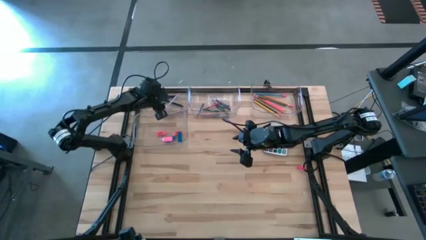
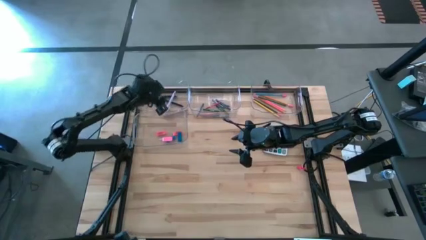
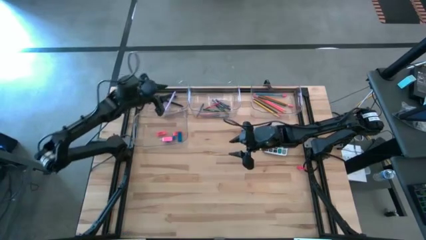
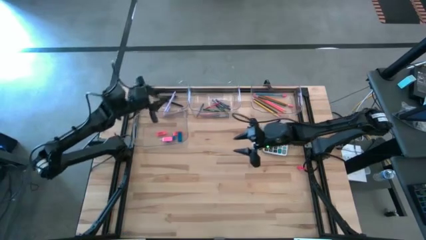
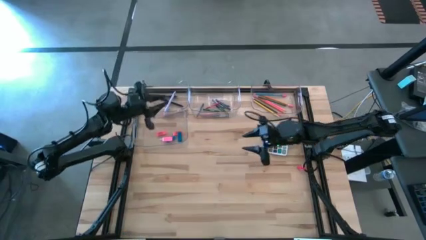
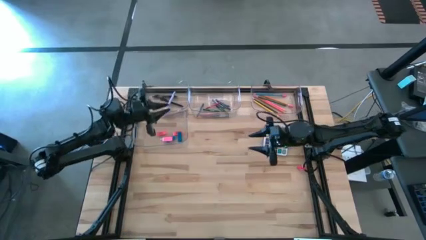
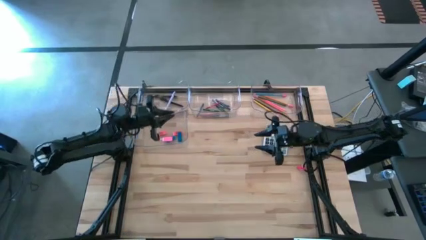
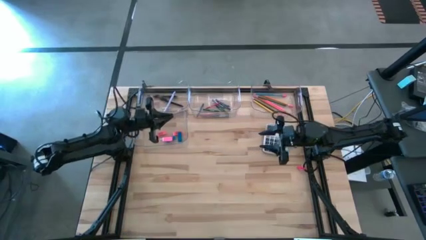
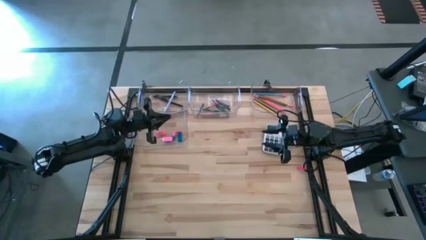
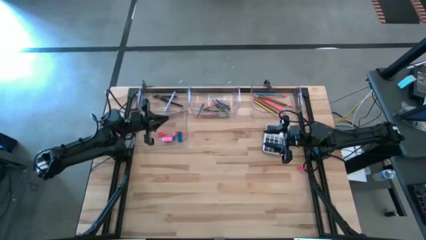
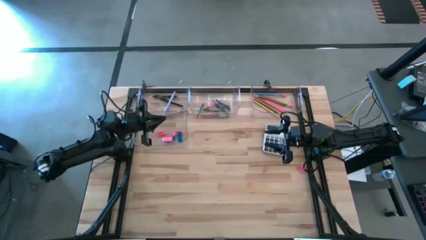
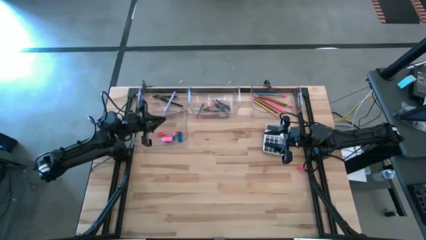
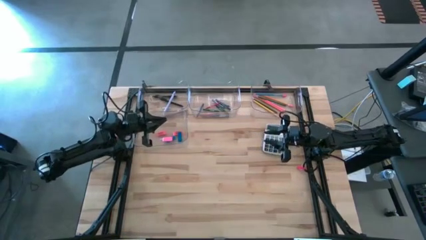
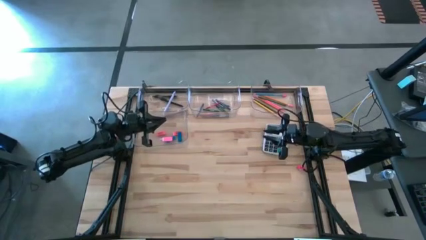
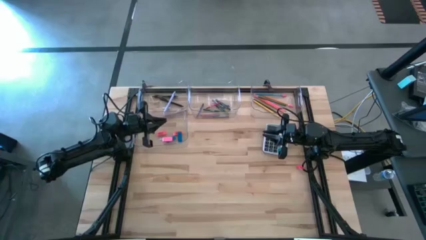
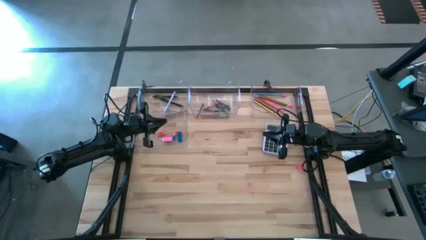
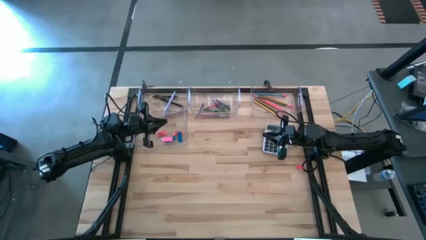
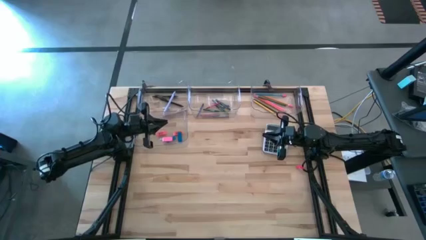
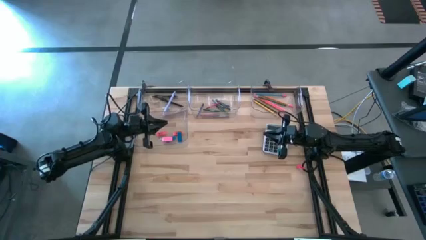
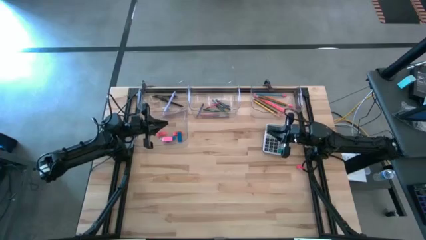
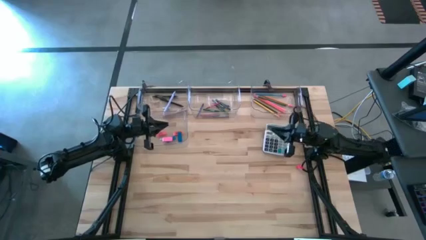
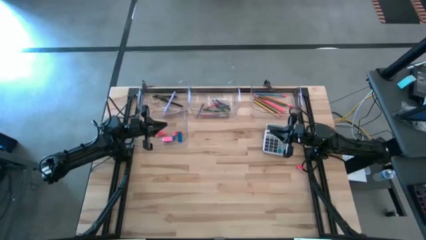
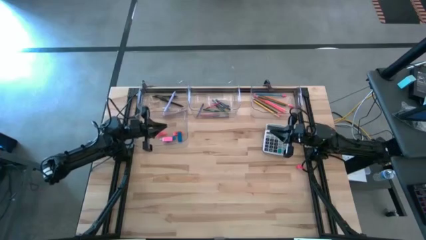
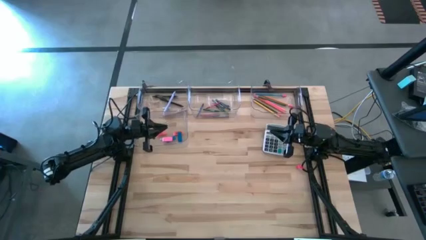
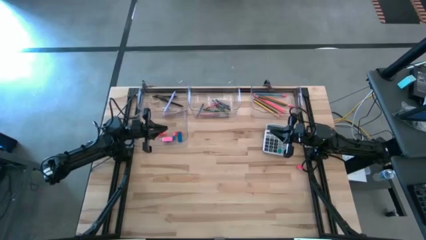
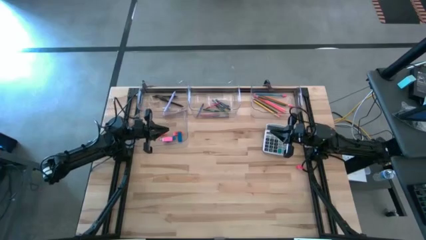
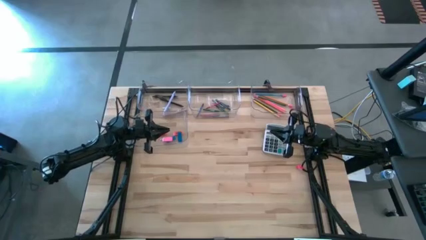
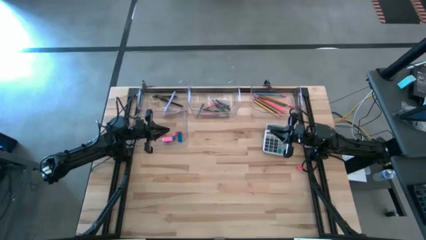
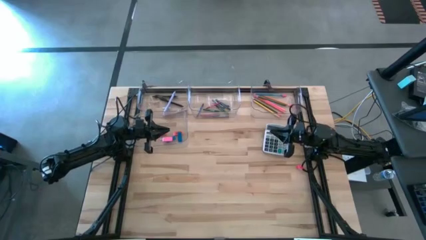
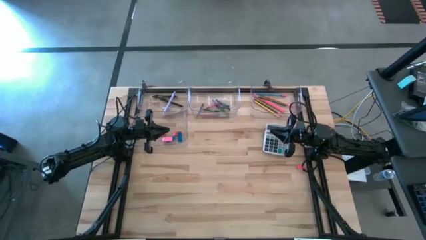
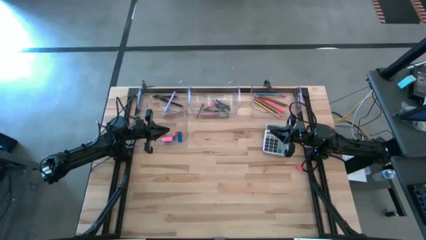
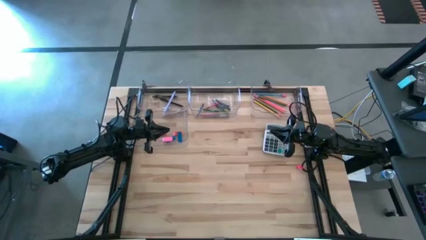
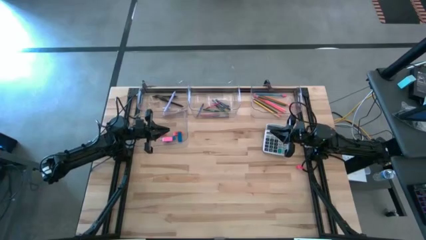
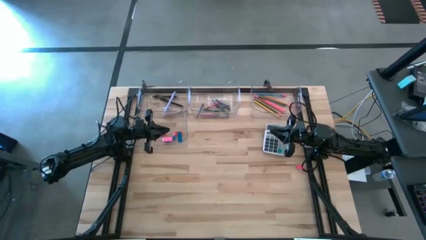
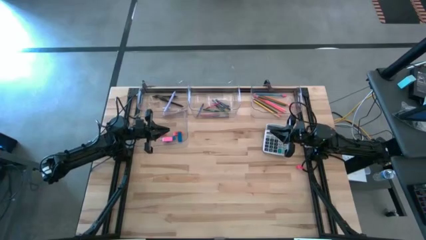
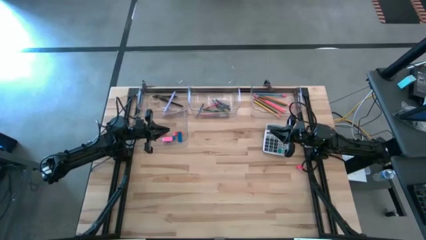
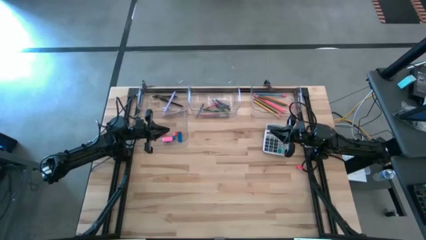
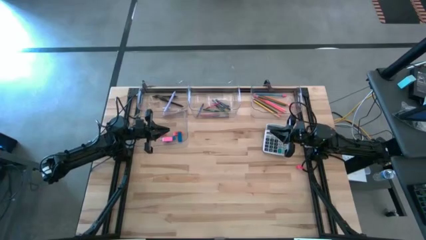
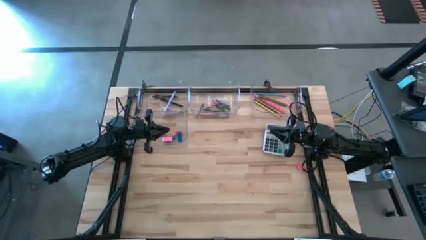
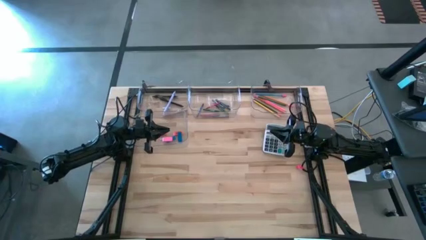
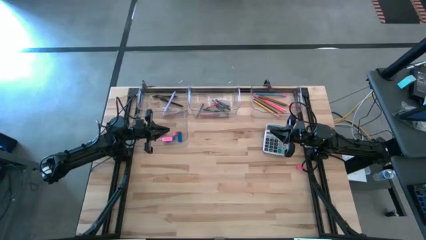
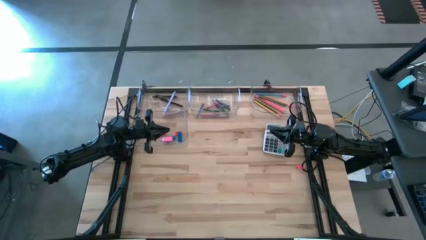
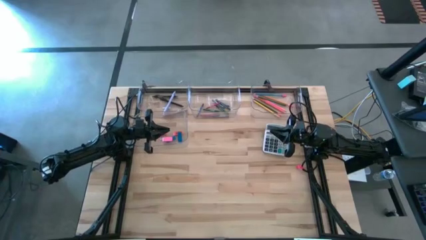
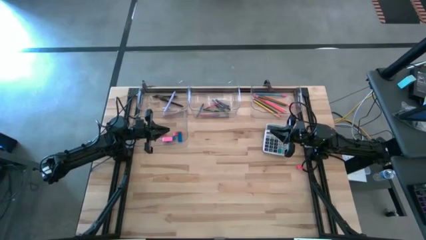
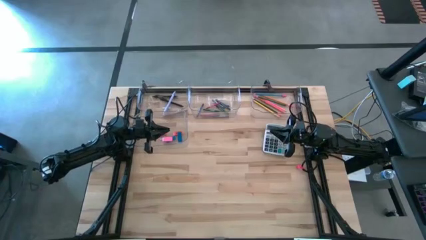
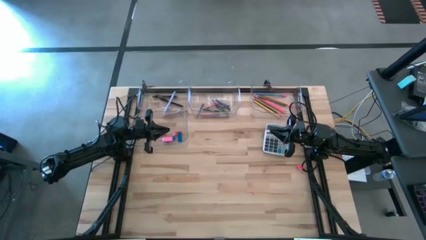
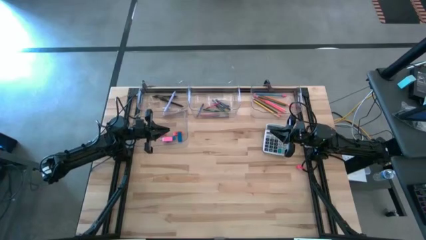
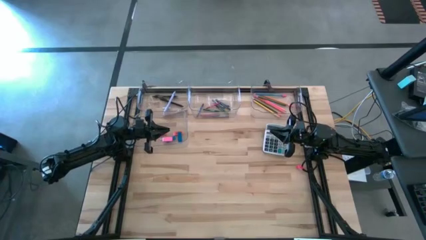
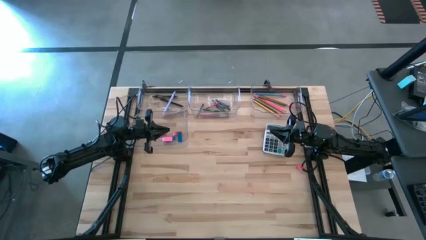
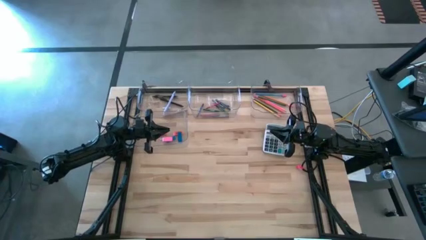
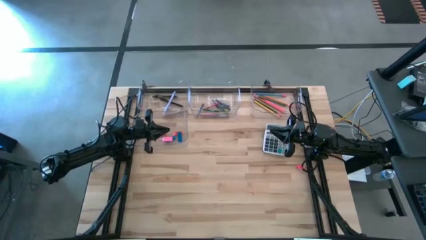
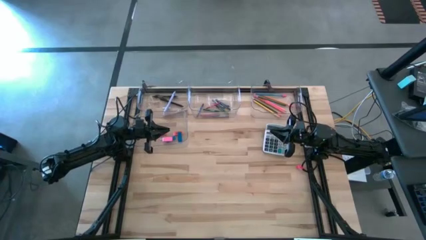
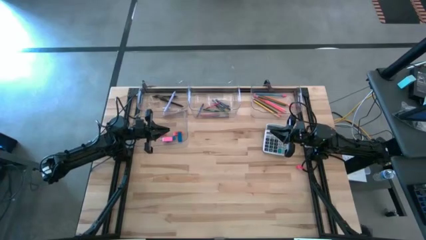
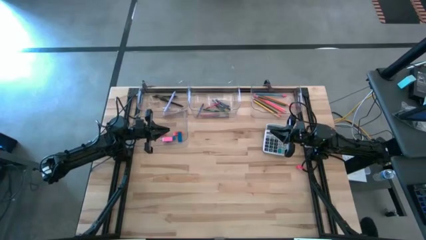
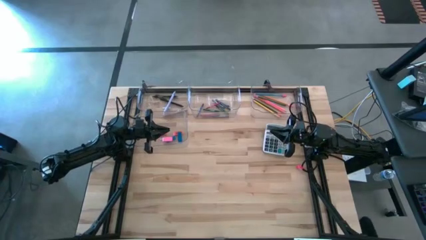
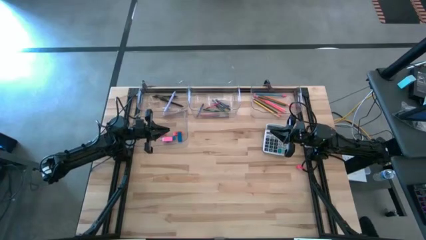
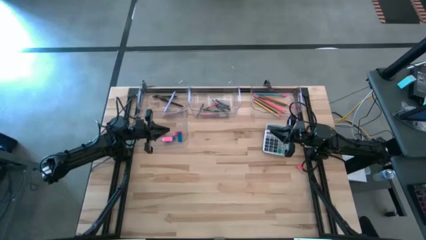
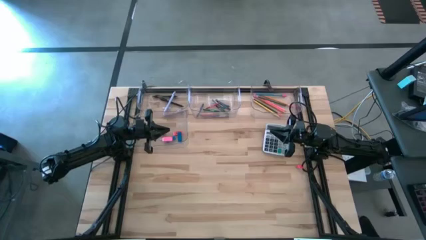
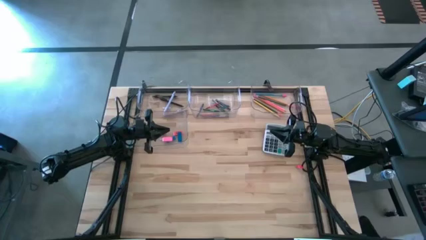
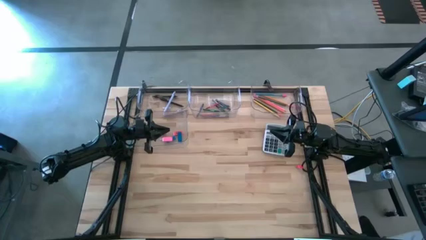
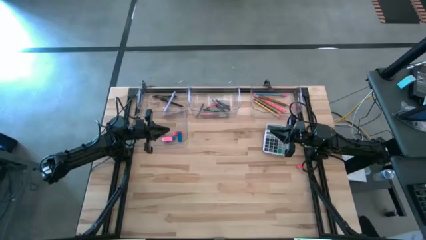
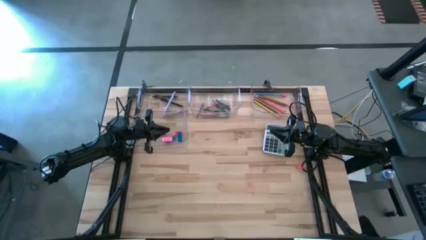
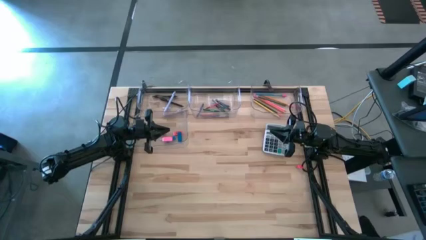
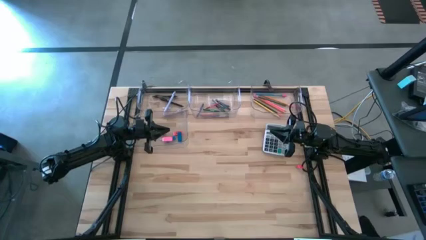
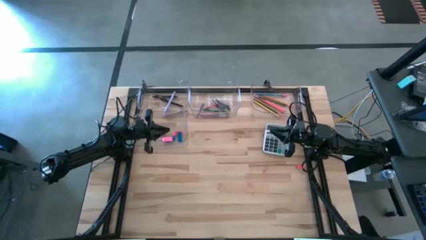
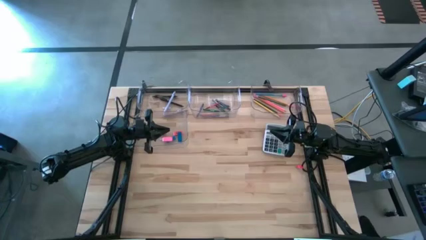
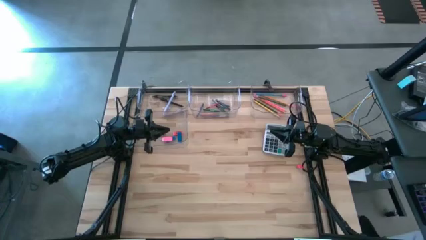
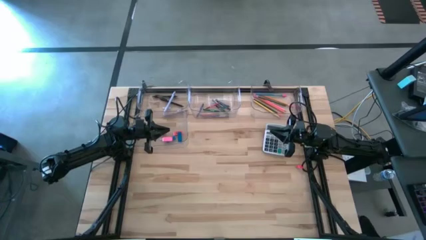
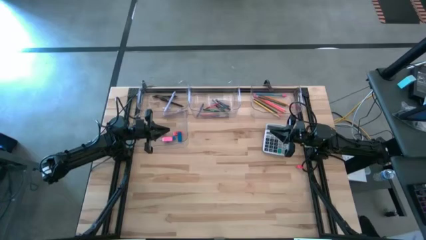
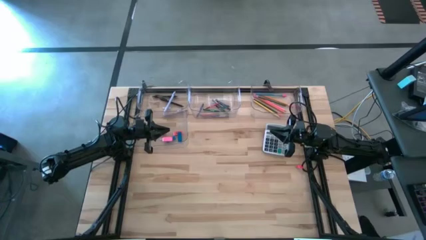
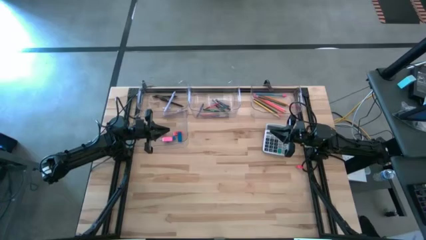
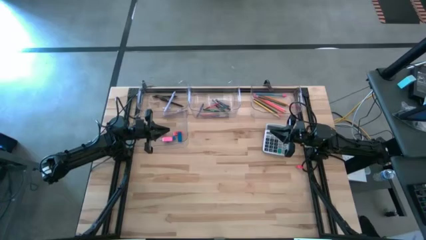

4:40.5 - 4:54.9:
Task: Sort crayons/erasers/pens/pencils in bins
Return to Home Position

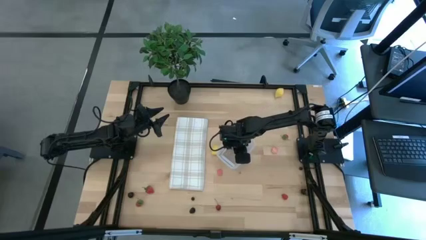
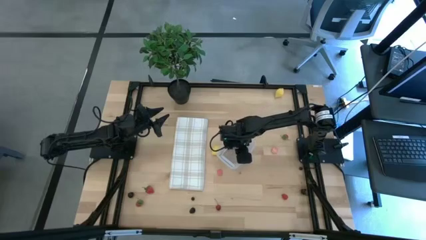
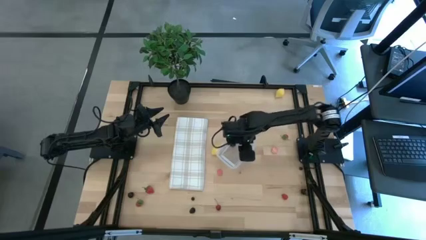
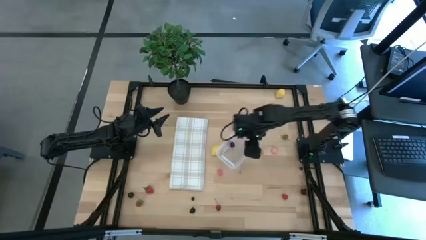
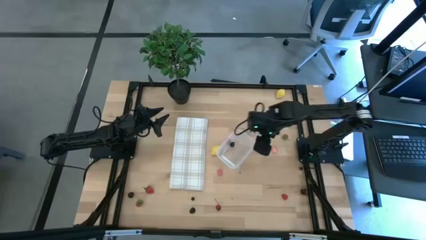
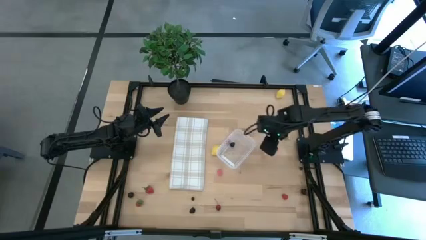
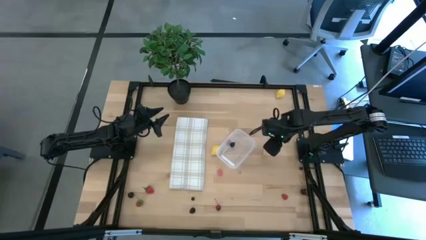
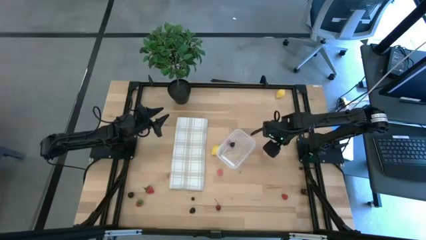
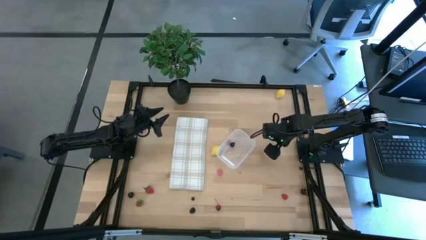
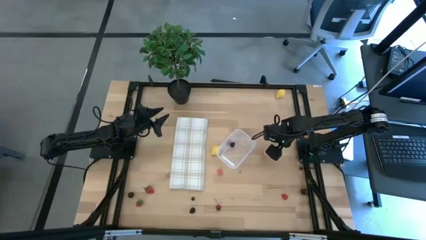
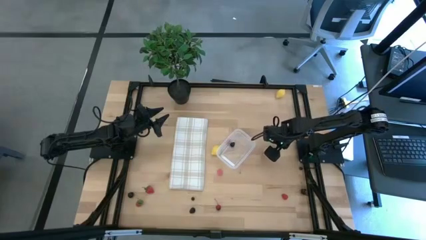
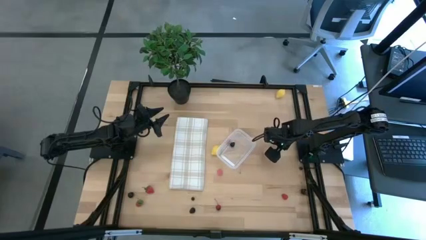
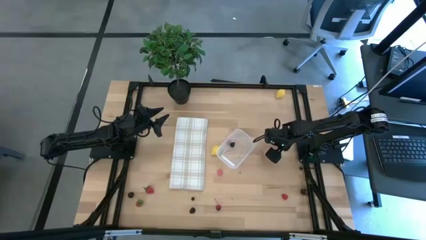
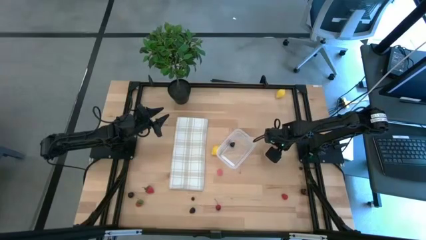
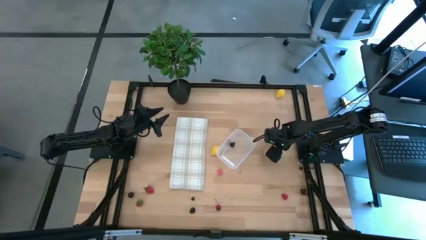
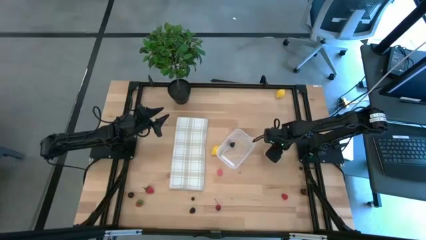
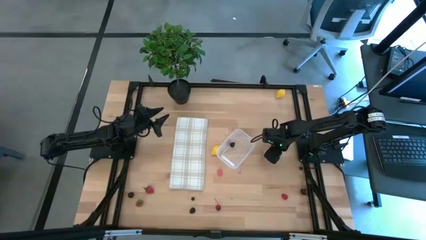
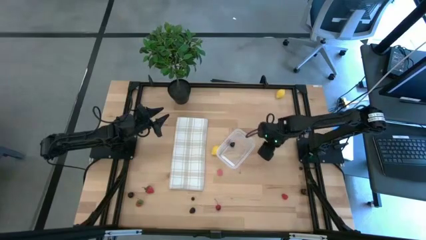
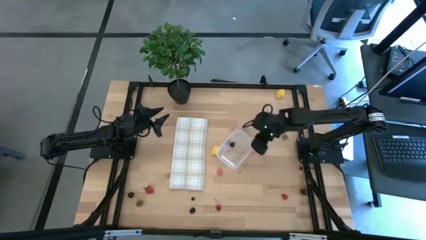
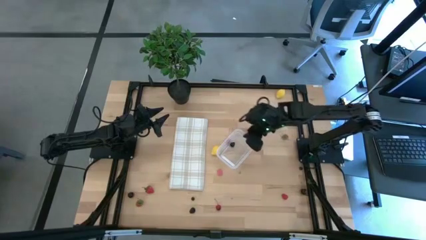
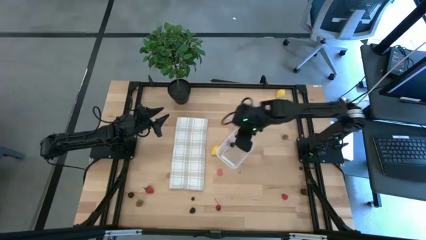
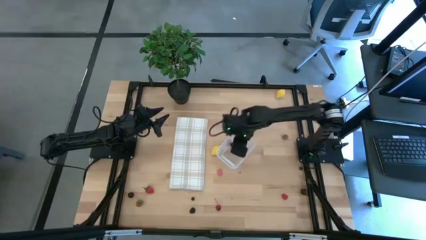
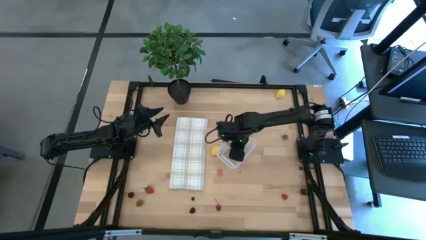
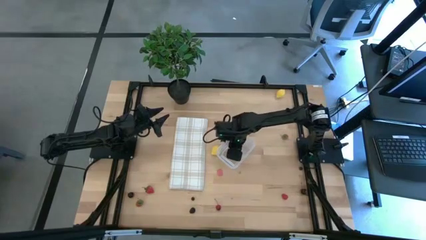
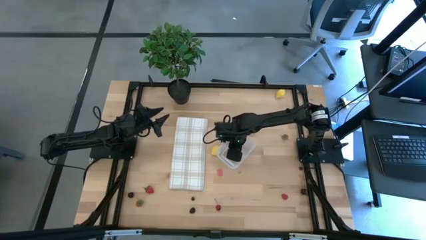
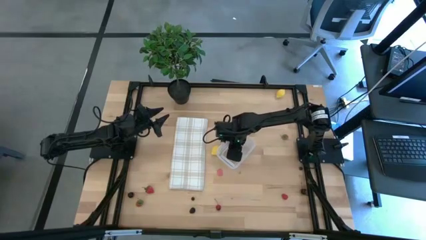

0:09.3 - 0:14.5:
Task: Pick and placing Produce into tupperware
Put the top right apricot into the transparent bin
